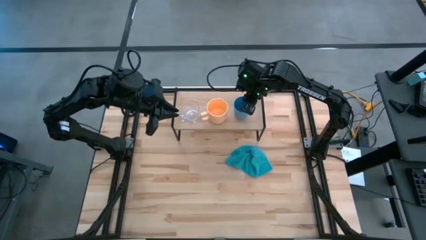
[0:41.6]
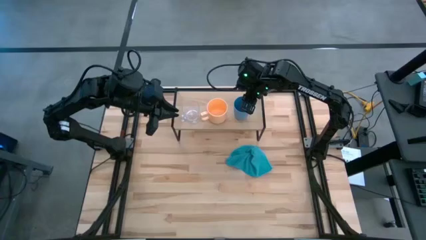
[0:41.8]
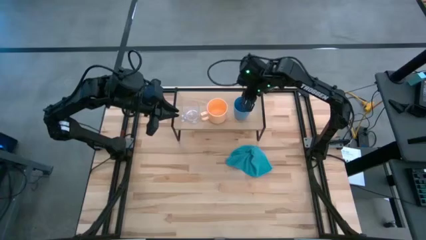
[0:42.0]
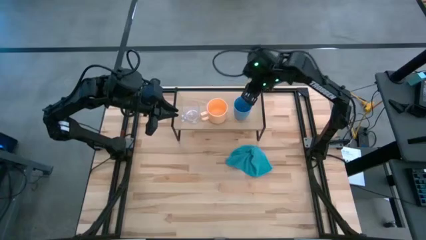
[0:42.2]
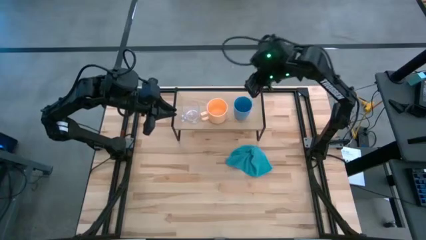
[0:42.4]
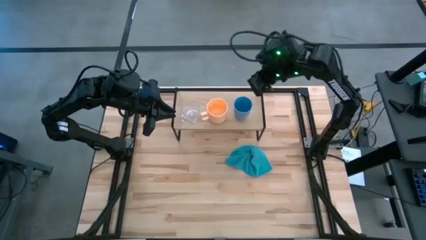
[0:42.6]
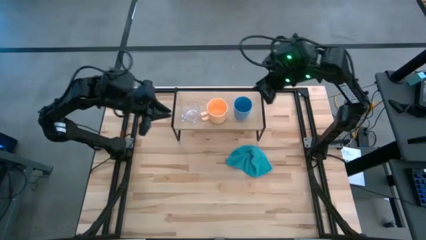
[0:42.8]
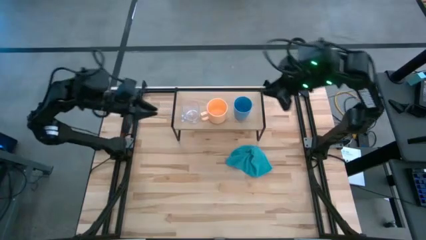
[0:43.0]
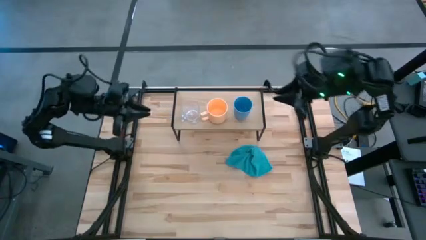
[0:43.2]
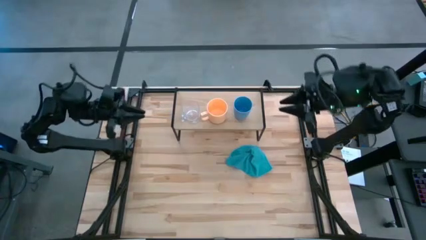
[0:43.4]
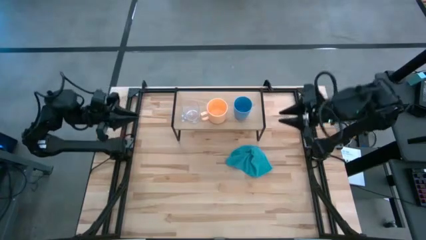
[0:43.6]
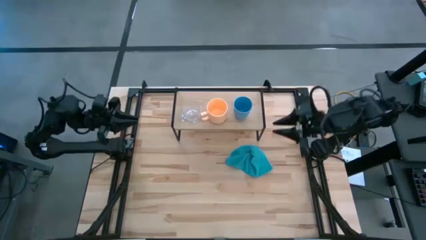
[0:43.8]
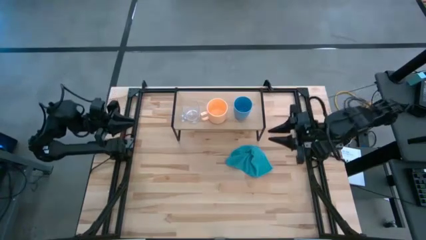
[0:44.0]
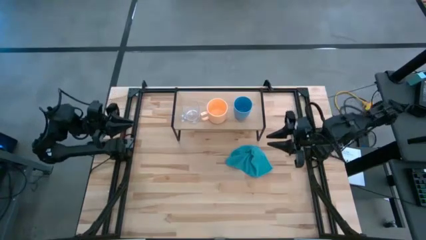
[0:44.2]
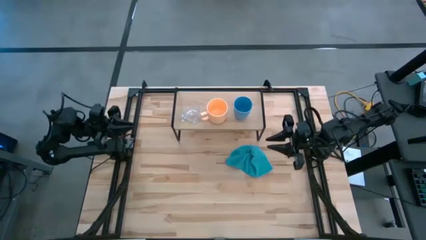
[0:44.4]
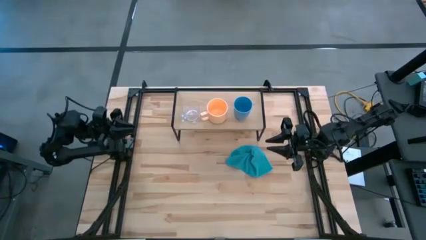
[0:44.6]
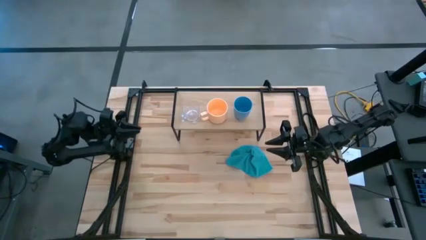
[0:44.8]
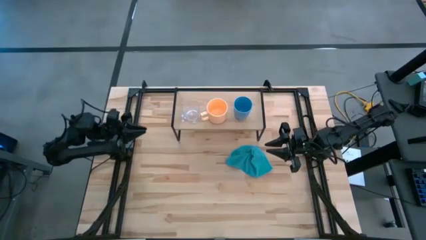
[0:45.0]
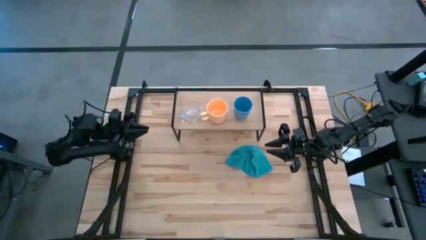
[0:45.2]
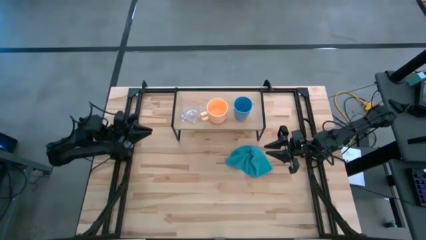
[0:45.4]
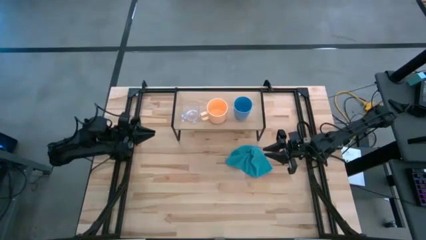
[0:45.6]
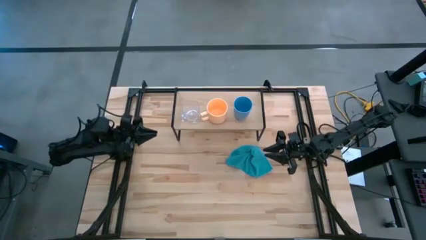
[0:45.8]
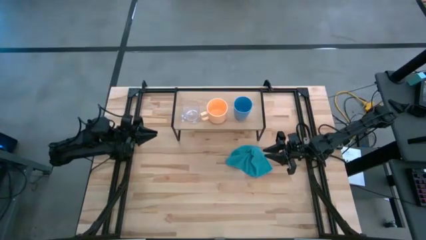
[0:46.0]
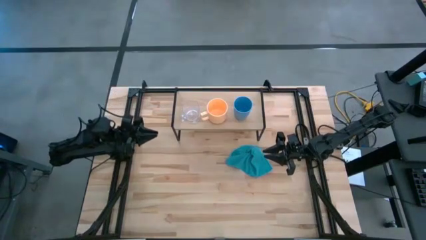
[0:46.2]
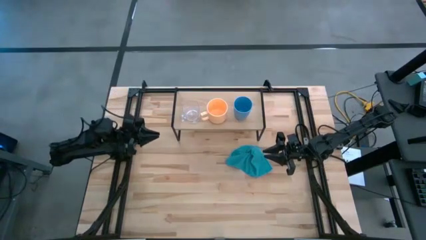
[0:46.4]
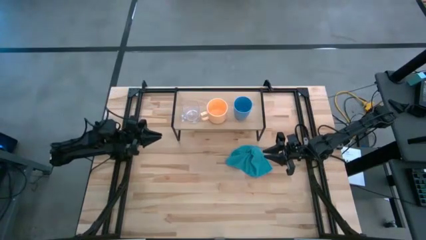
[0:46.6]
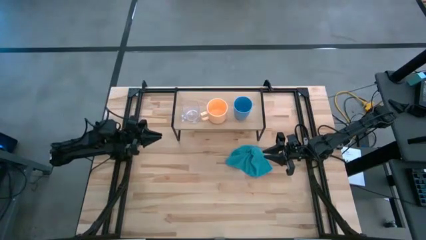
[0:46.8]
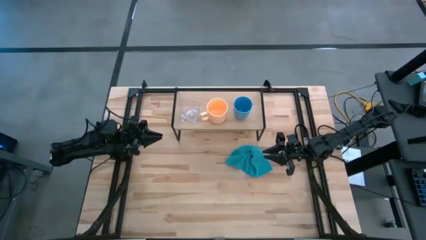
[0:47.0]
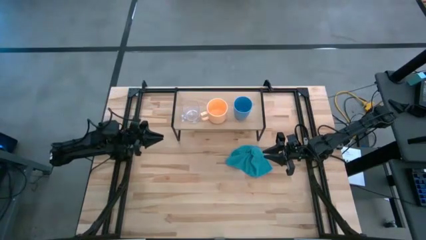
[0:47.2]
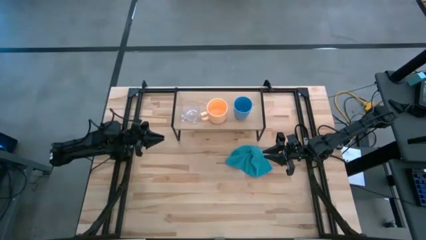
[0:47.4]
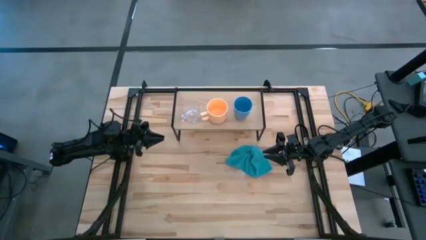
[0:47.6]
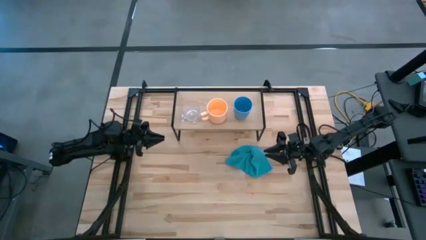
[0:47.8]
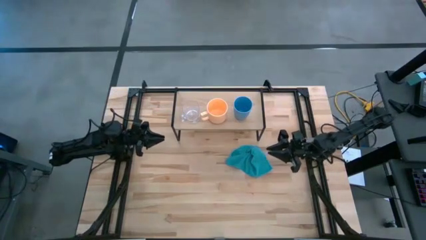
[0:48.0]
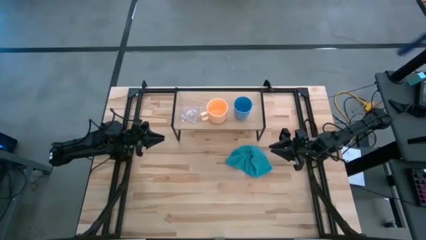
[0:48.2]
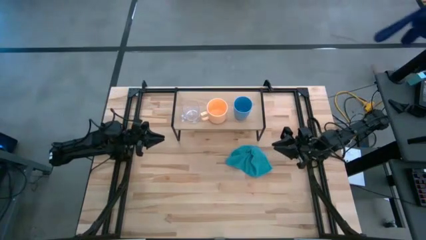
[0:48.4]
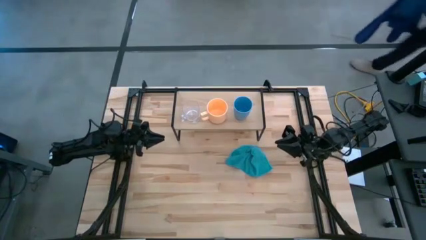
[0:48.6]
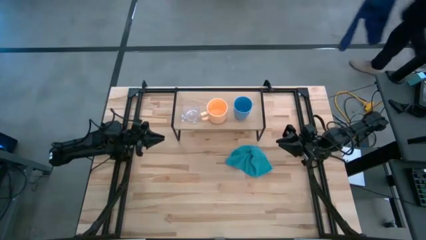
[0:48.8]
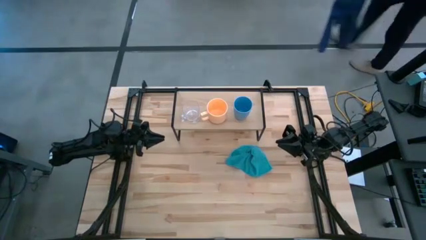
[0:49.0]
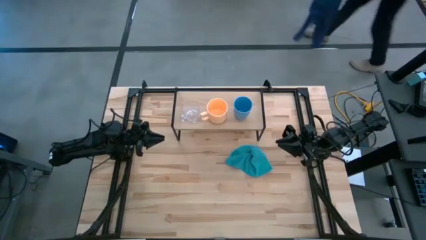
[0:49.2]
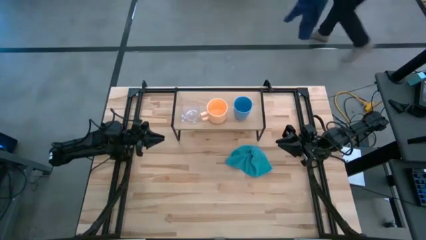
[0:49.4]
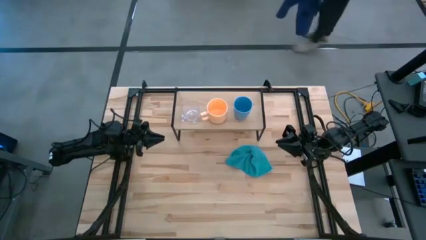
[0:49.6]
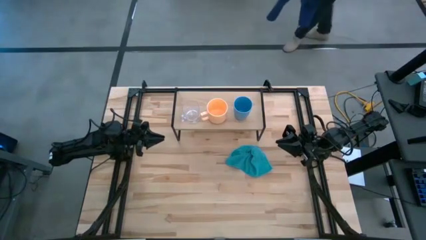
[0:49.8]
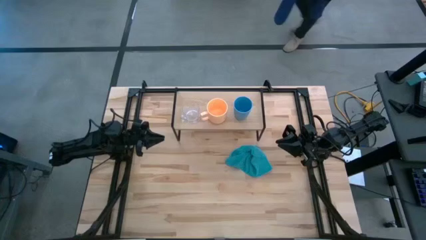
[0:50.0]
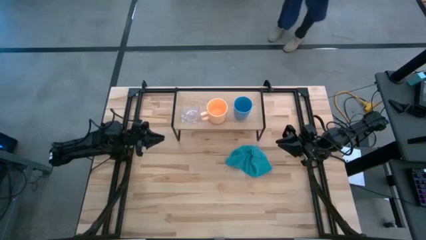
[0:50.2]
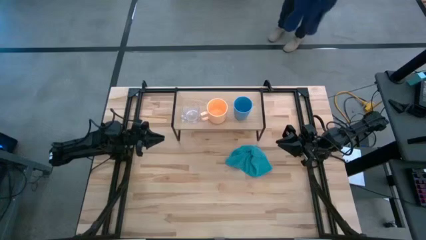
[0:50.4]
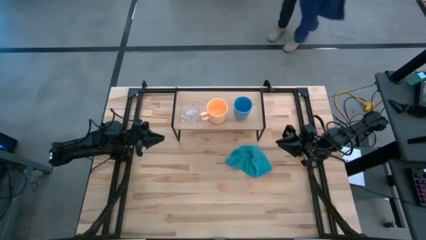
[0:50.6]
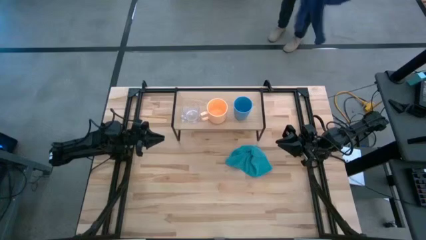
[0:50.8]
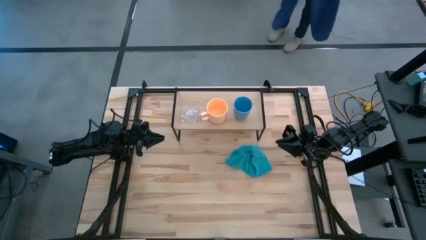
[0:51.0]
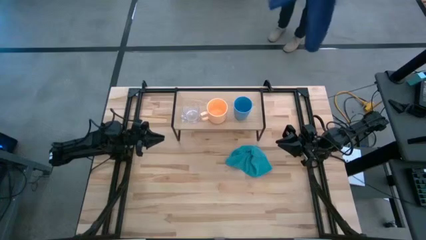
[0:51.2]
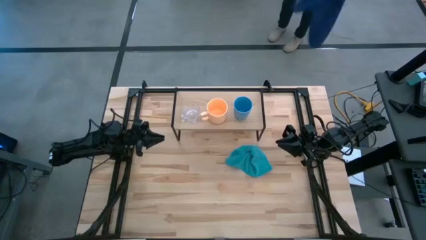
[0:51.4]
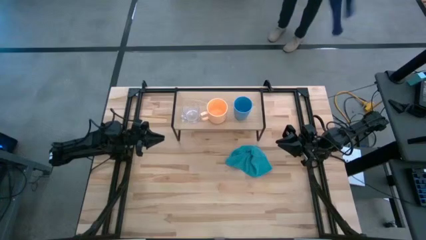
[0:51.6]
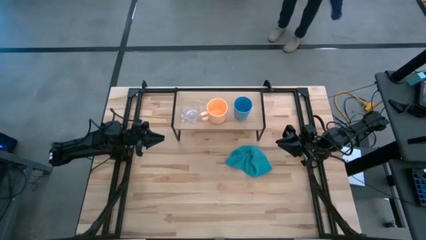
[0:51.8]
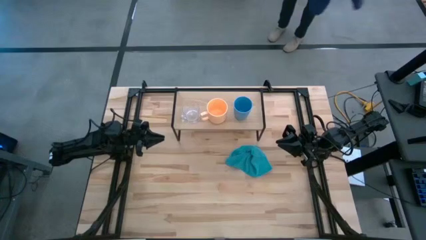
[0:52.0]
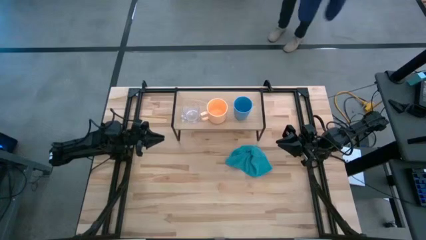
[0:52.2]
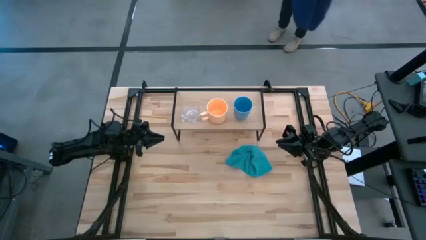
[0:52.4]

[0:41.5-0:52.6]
Task: Stack small to large cups/mugs on shelf
Return to Home Position
